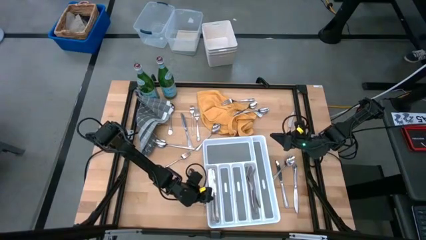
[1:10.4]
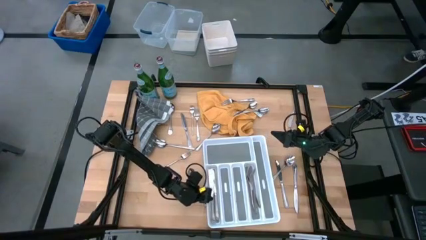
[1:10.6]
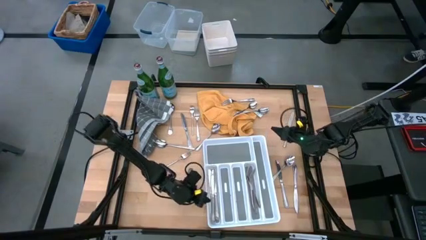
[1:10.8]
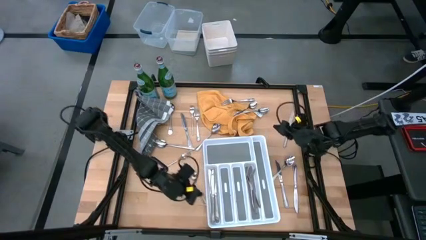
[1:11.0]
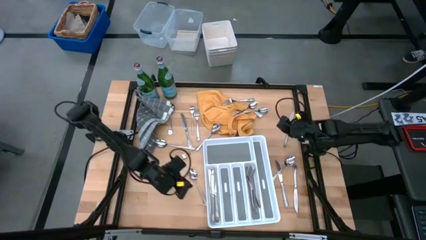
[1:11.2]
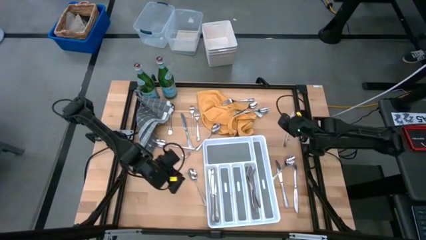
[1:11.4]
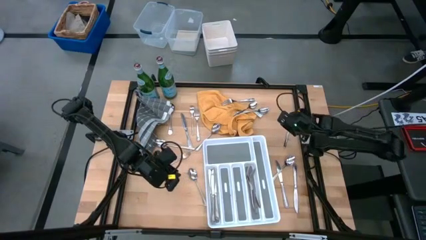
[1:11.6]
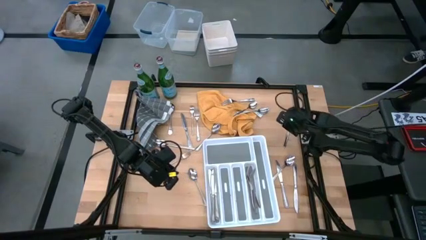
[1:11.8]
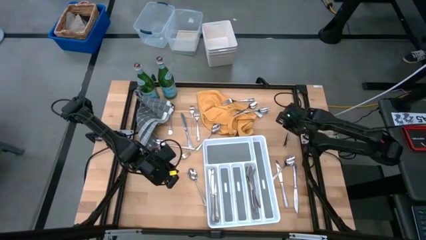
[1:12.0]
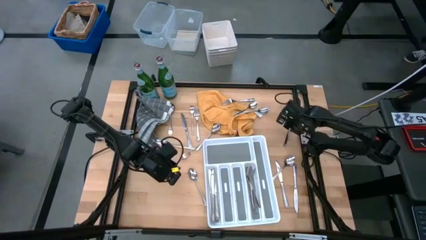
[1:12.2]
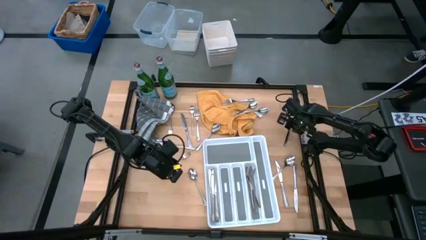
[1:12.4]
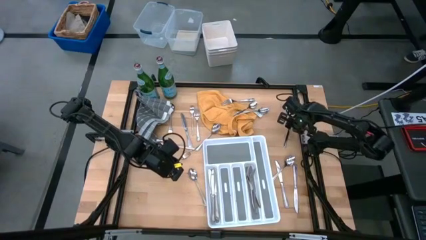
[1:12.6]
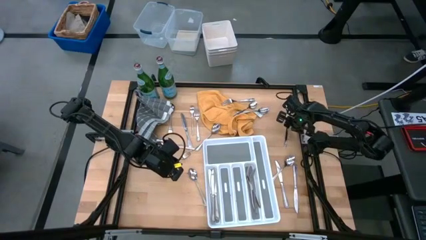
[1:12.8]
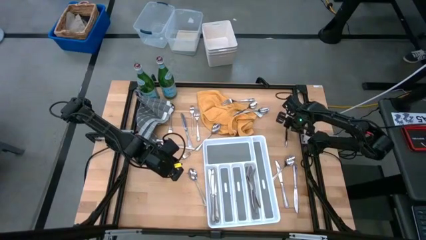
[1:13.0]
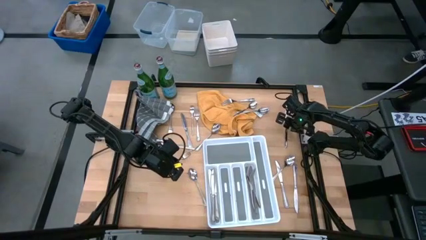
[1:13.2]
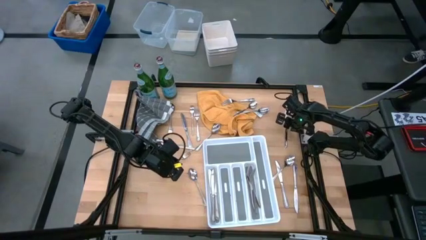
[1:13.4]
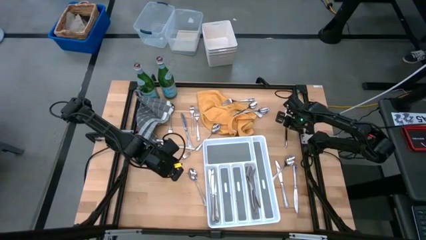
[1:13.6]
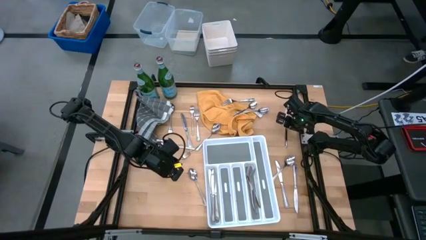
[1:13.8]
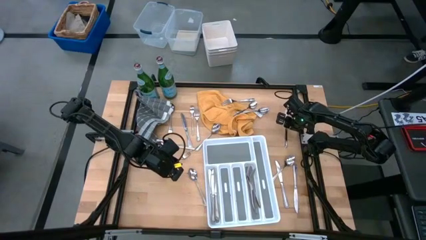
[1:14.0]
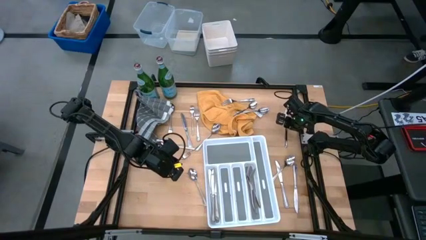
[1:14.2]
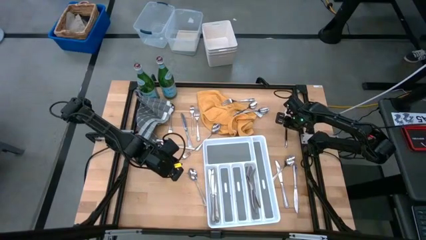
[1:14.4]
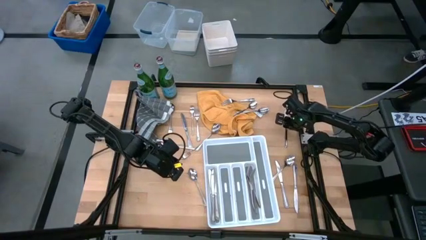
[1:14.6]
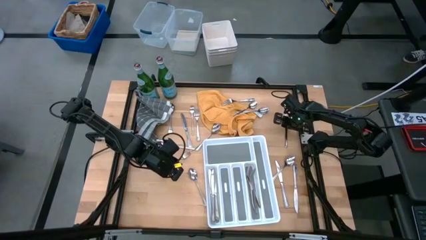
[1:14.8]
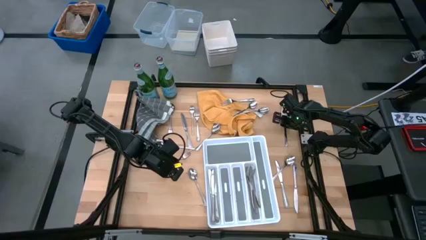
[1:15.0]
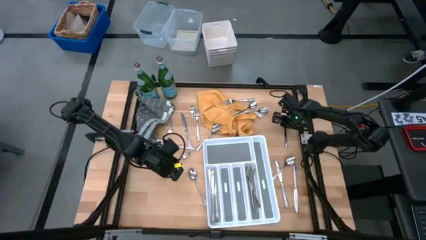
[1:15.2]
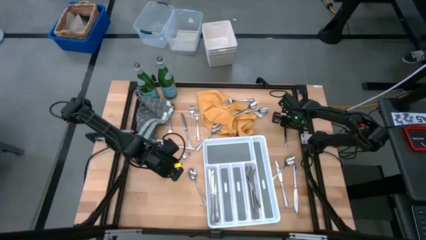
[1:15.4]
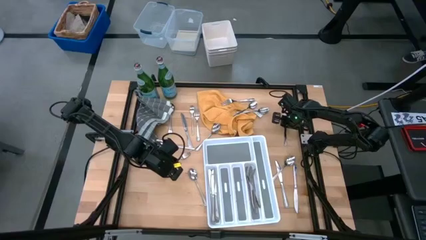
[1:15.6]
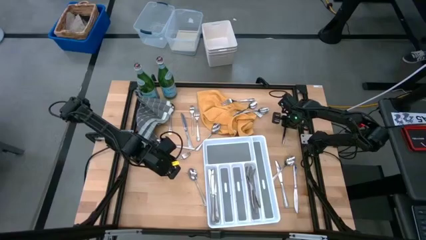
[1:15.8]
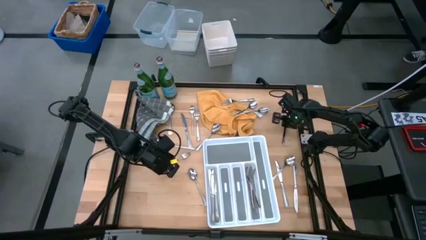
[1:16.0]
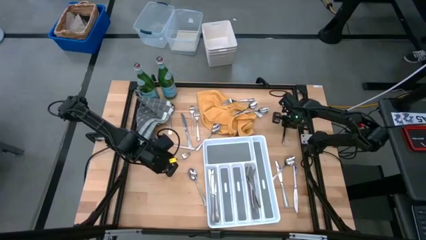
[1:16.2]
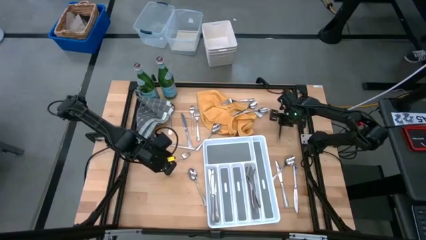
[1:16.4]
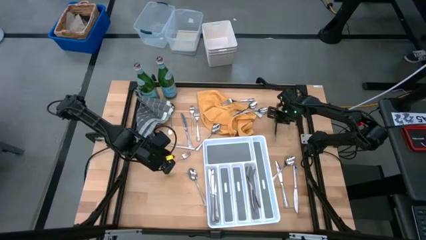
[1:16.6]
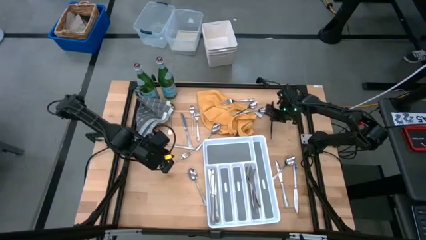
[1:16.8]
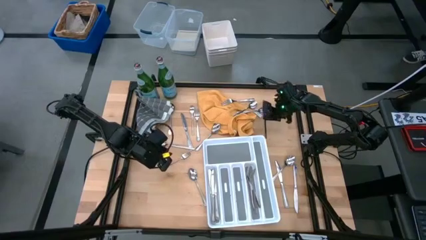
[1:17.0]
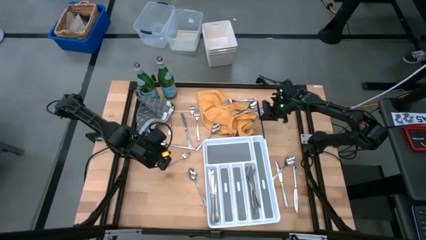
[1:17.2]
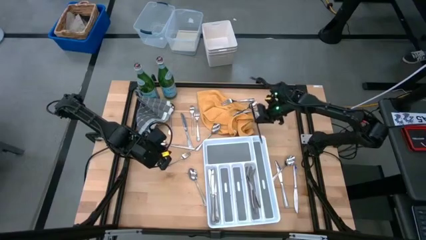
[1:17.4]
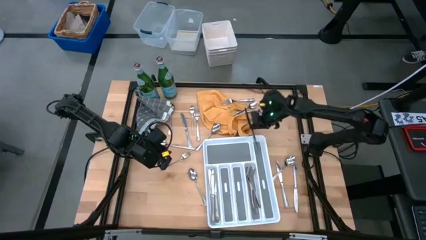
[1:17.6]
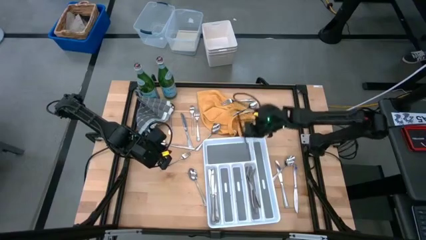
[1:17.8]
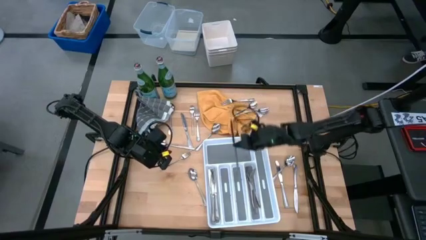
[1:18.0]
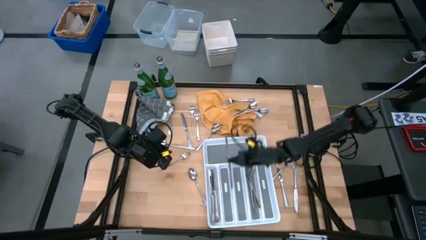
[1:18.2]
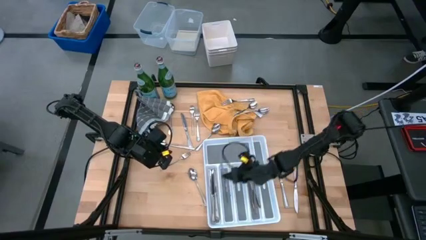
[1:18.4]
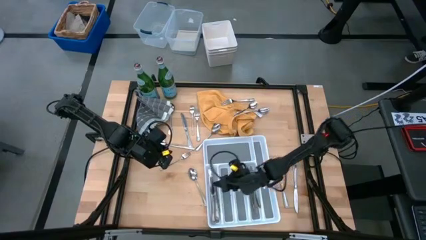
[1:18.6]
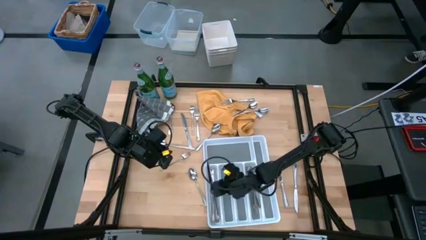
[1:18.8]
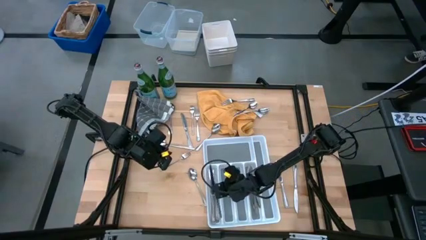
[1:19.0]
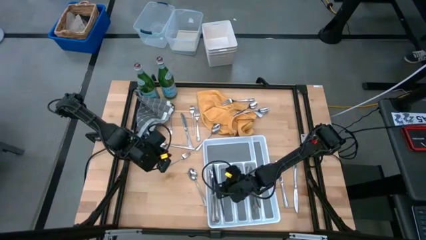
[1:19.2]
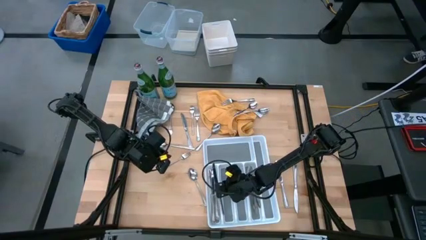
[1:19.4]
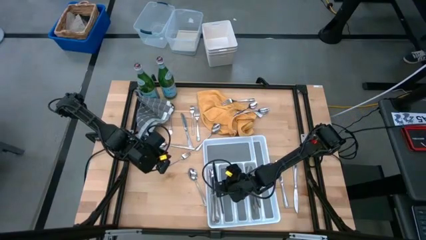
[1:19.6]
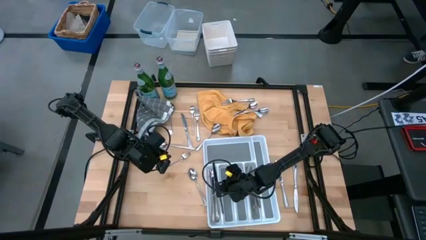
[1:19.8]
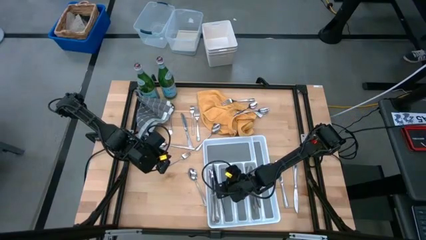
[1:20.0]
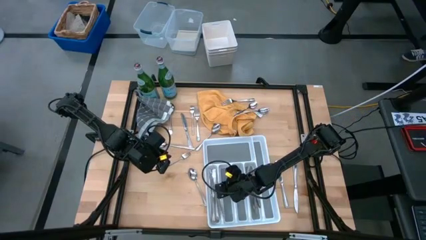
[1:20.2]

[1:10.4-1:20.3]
Task: Sort silverware
Put the table knife into the silverware tray

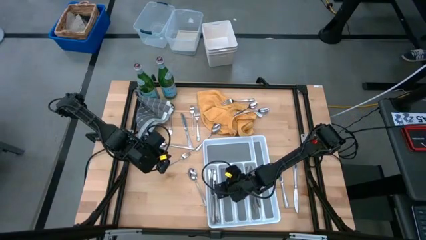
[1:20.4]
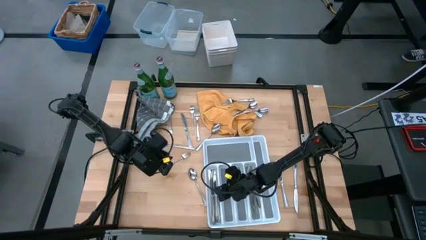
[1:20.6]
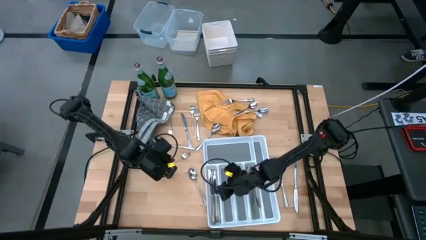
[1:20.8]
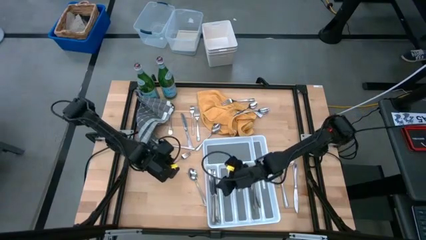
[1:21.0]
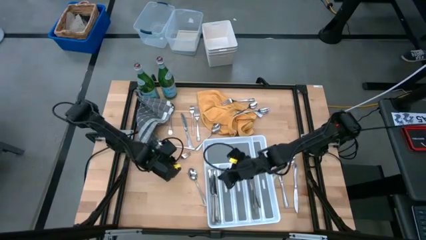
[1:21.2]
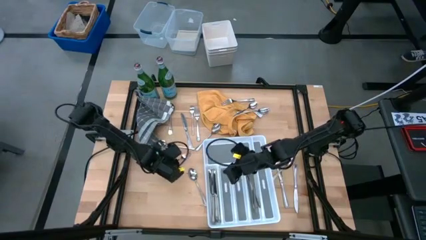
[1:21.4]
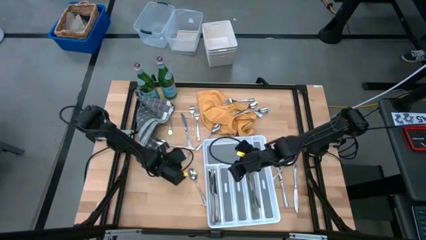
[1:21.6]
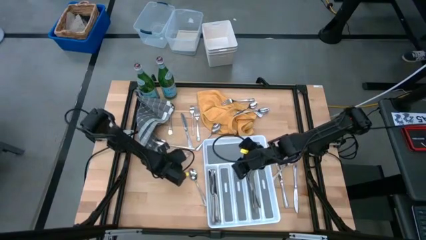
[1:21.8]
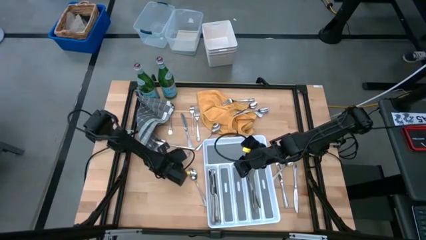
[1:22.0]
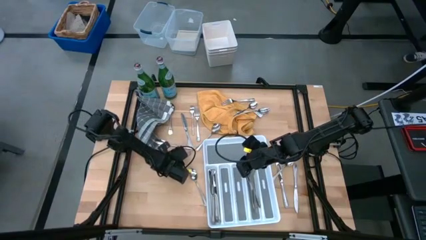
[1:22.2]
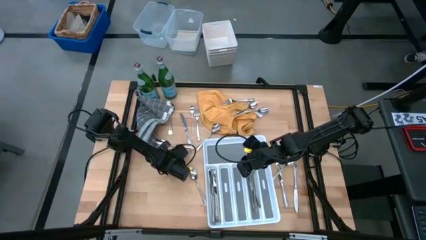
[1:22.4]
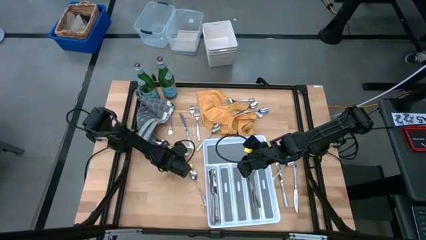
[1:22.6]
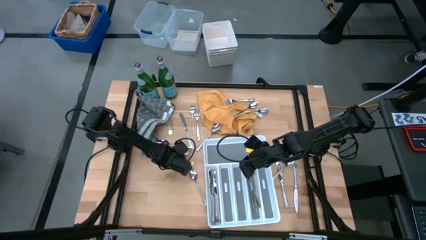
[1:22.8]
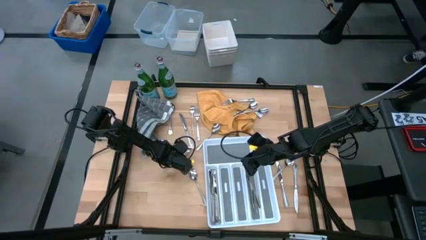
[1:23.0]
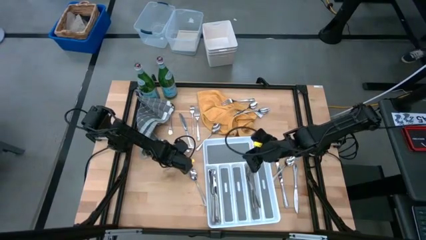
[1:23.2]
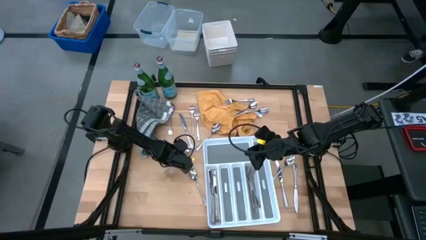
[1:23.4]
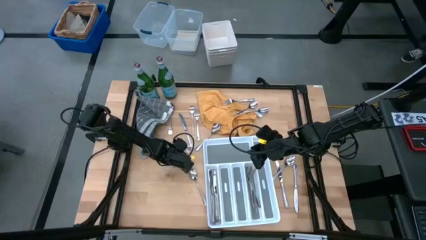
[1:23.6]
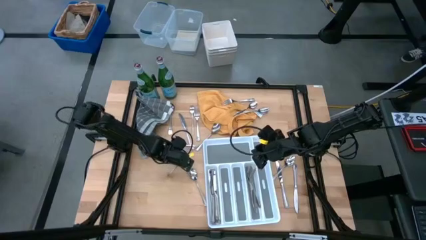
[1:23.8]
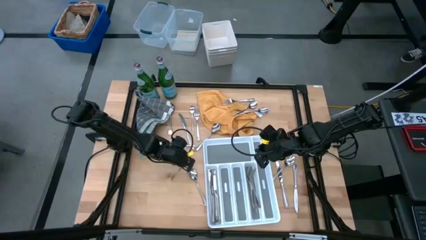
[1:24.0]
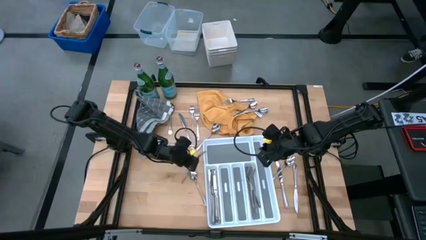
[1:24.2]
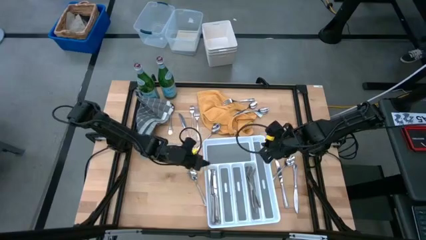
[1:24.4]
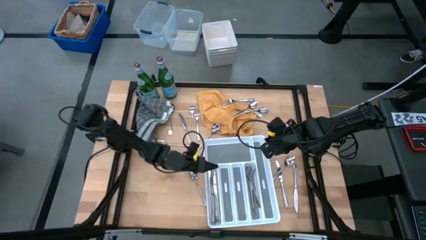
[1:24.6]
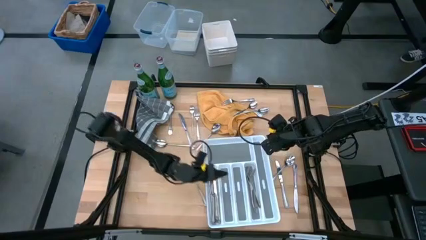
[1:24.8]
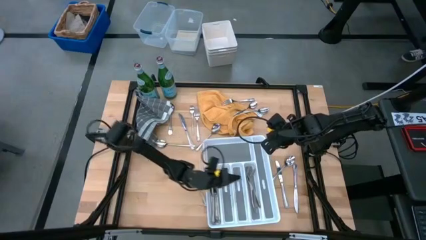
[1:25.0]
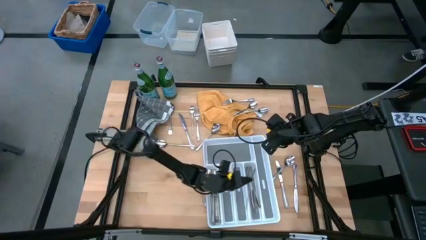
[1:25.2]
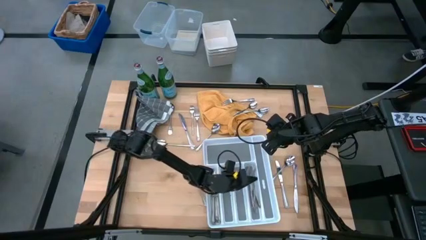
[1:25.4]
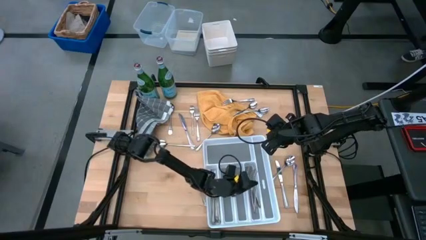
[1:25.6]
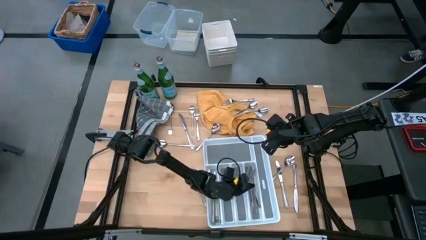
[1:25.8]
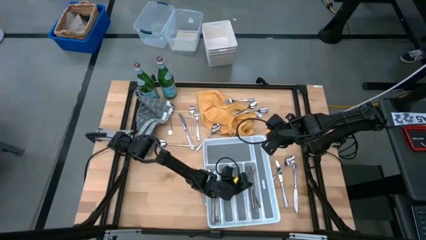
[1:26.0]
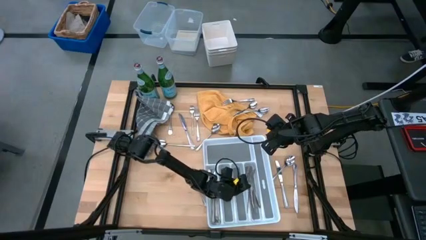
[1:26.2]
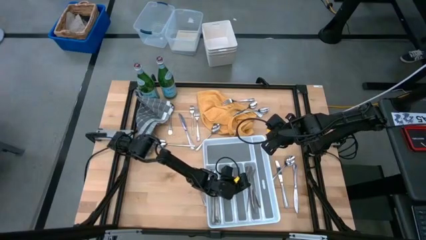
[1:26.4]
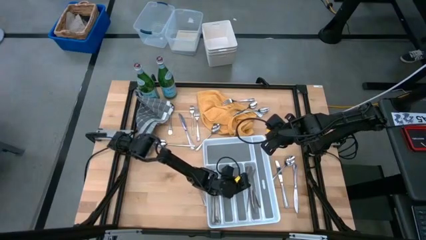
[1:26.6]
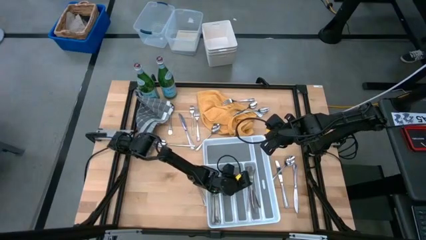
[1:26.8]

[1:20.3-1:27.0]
Put the fork into the silverware tray
